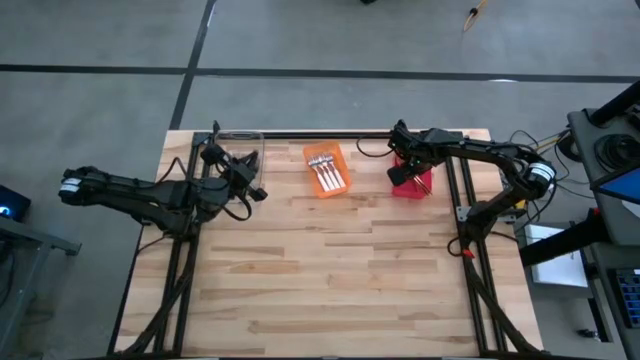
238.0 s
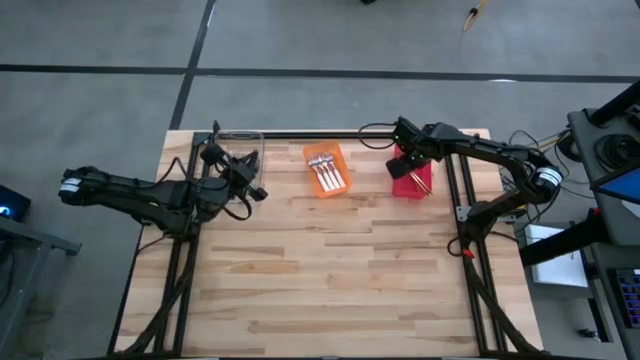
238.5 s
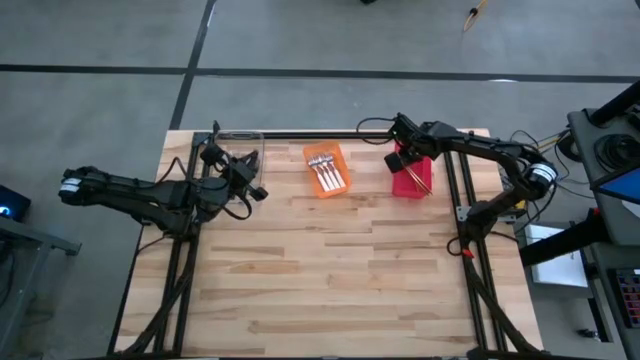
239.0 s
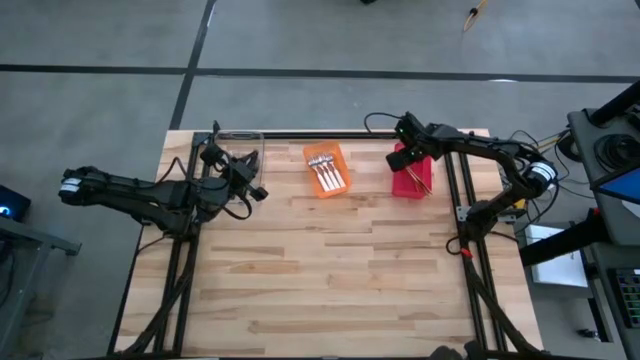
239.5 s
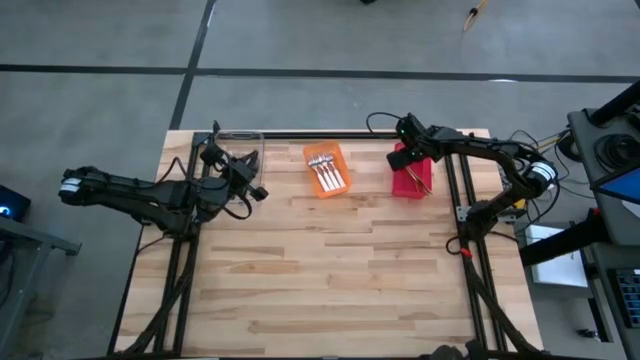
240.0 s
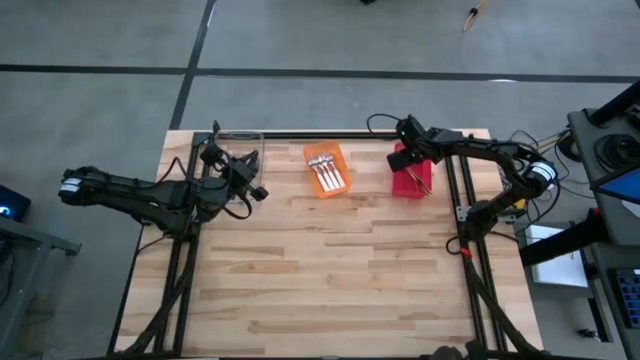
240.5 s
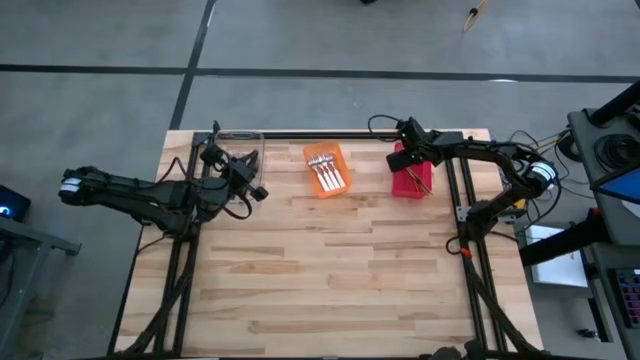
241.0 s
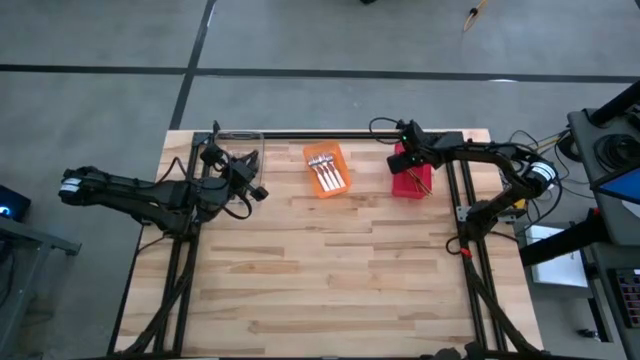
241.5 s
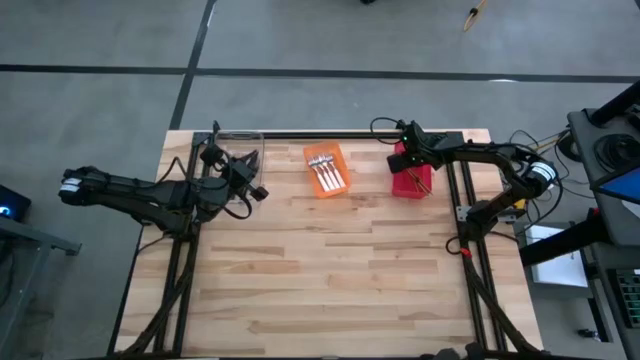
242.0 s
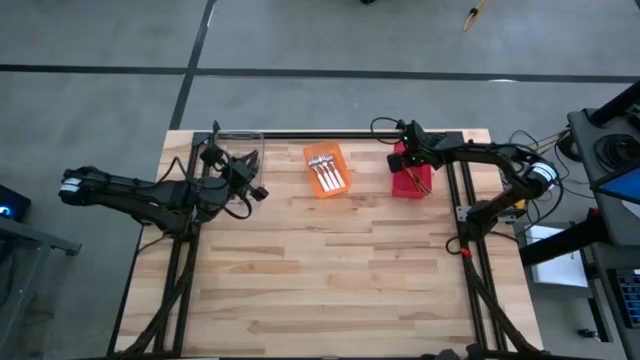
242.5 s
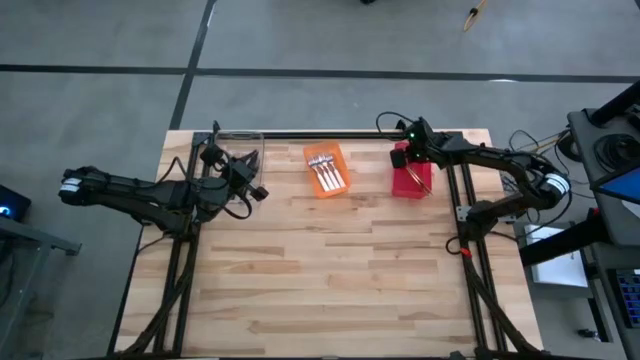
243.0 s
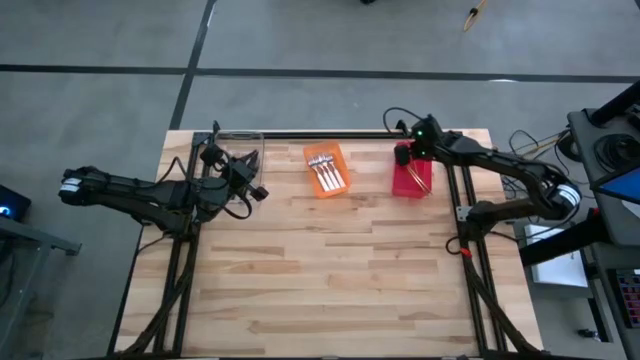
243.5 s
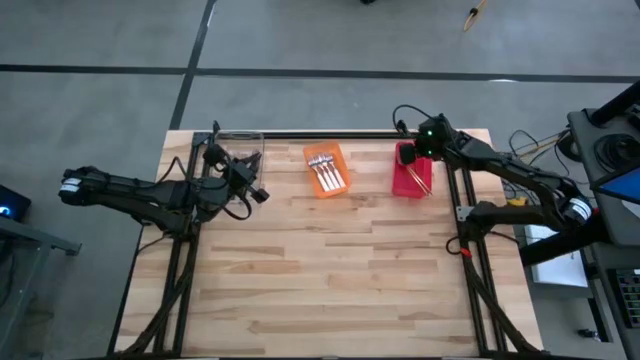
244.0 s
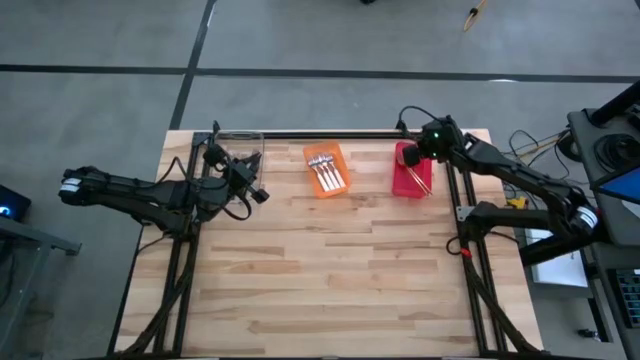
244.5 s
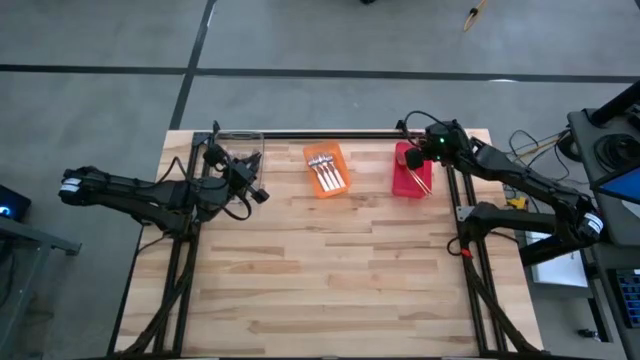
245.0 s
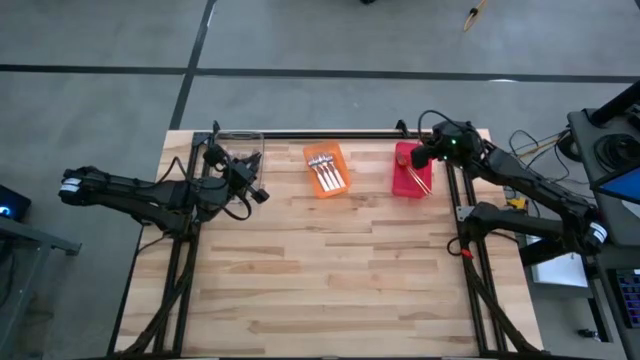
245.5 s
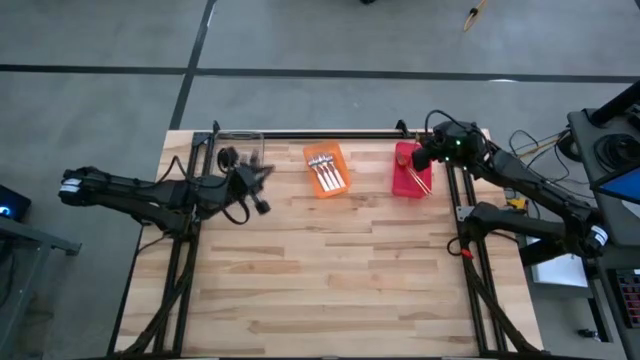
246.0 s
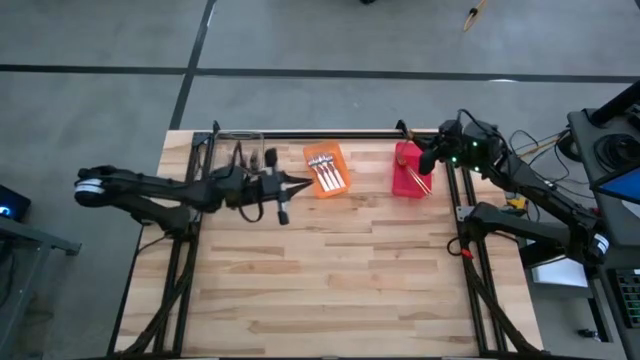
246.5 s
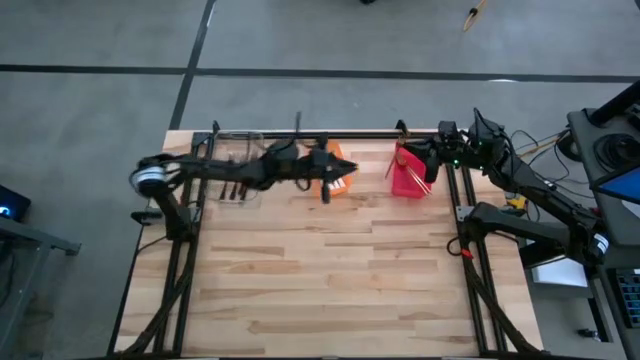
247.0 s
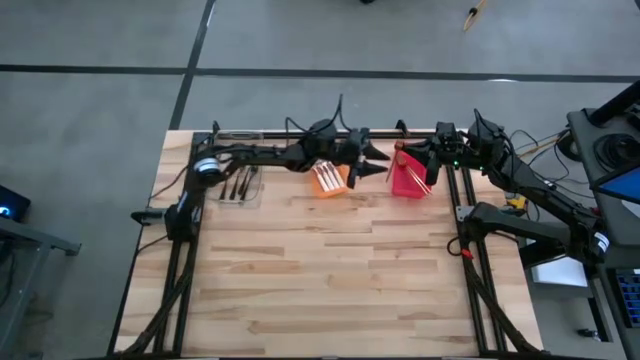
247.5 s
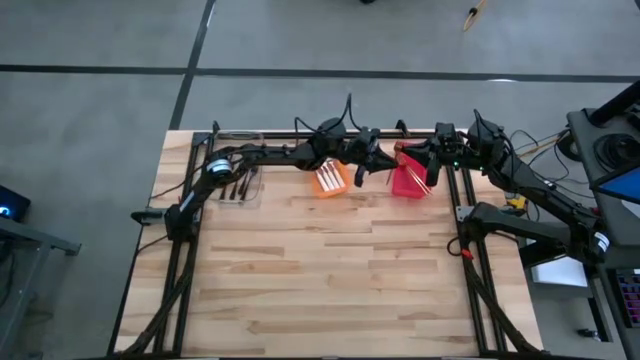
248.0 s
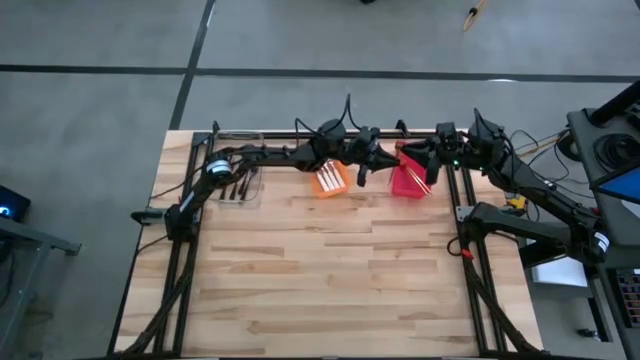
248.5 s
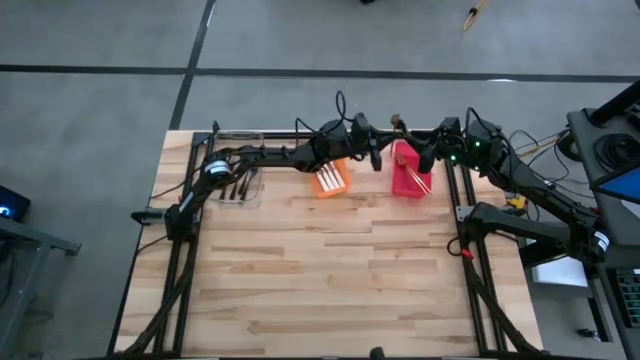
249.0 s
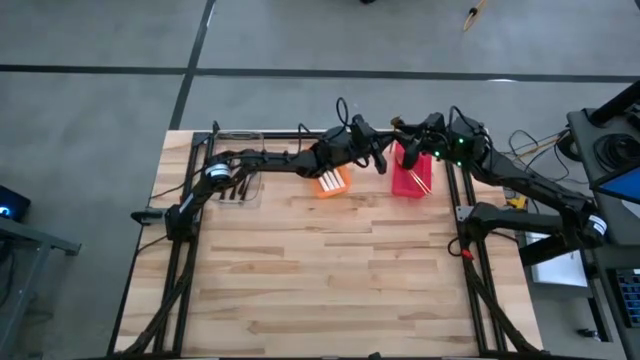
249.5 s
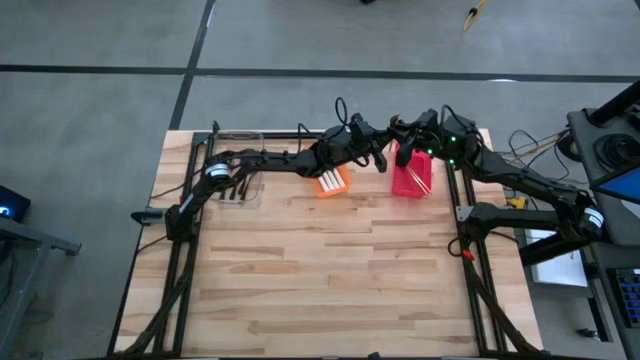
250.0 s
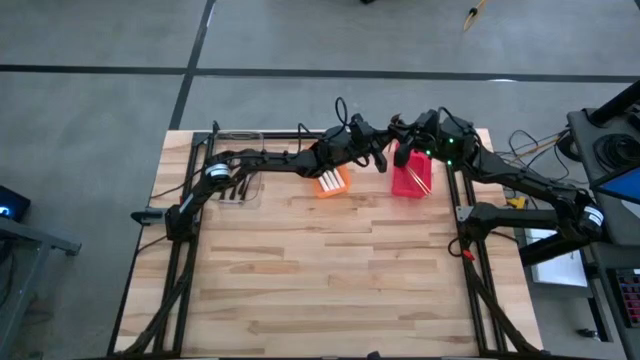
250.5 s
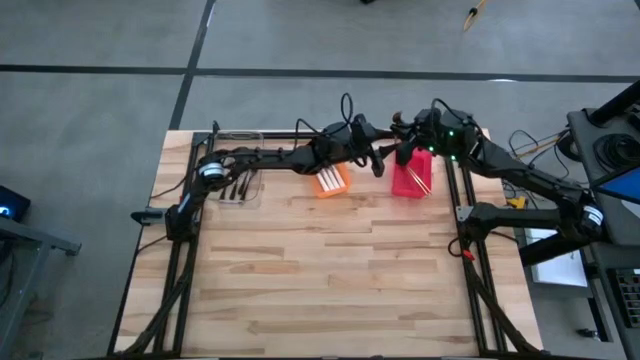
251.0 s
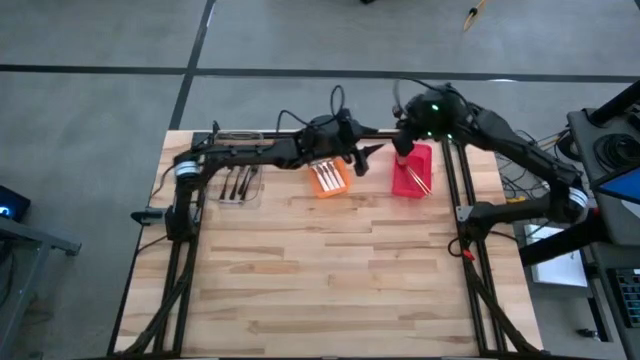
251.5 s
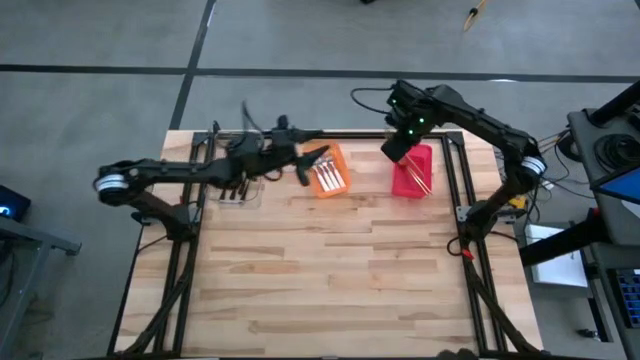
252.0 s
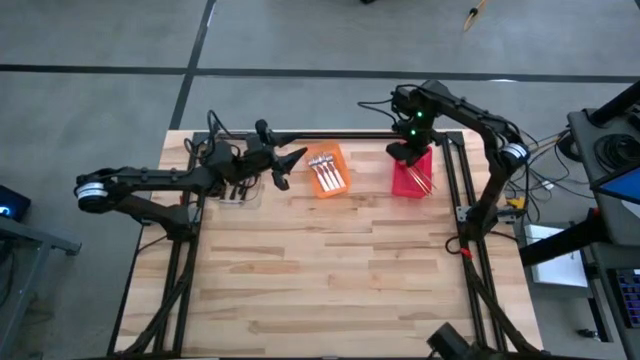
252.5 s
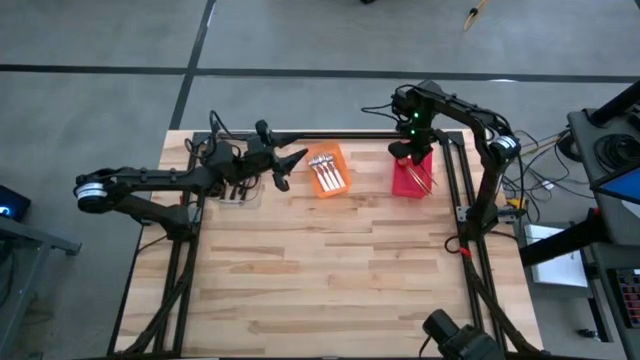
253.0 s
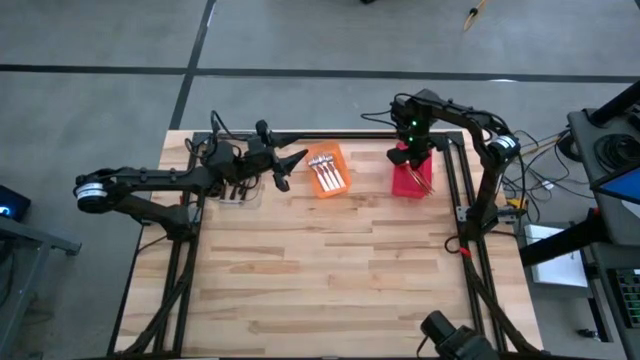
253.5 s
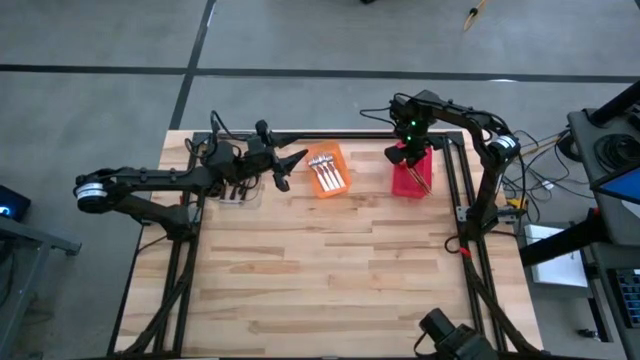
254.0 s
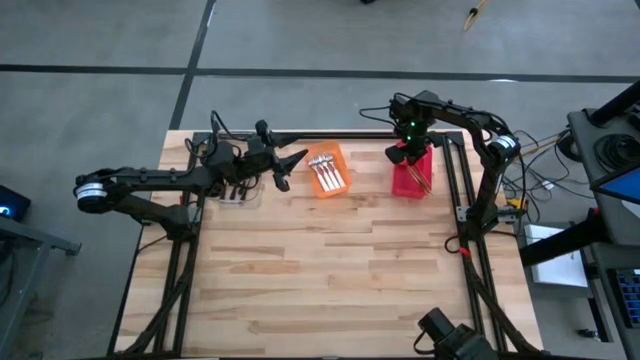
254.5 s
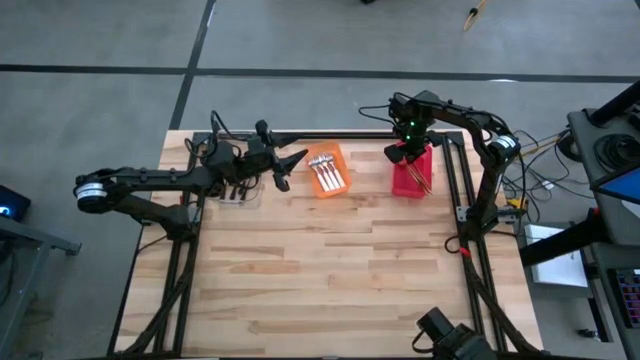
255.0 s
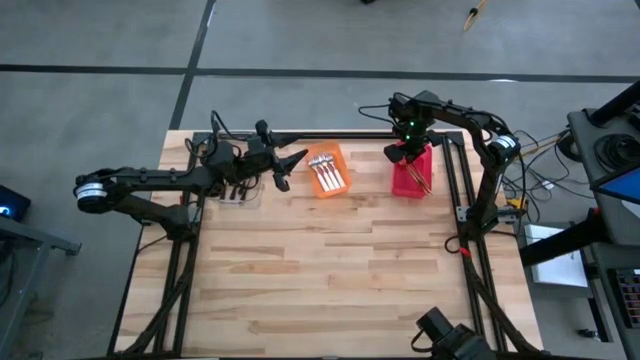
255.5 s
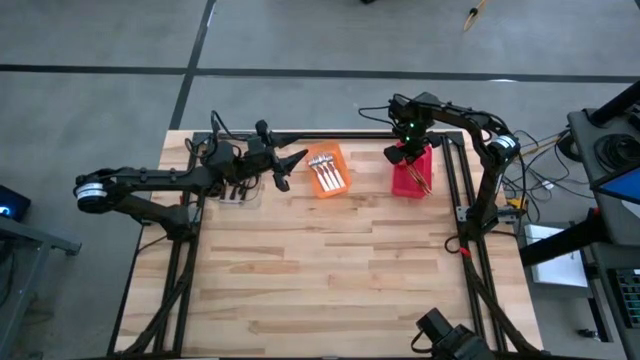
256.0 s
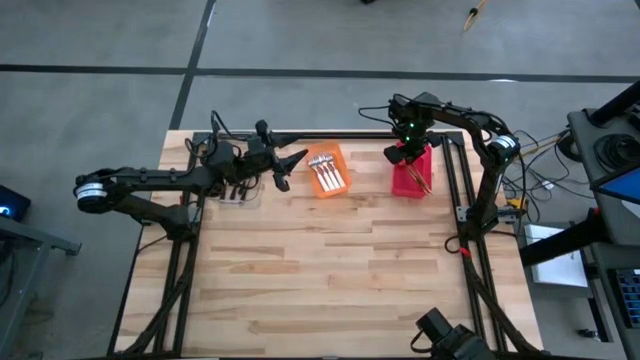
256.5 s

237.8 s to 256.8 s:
Task: Sort silverware by color (type)
Adjust the gold fork

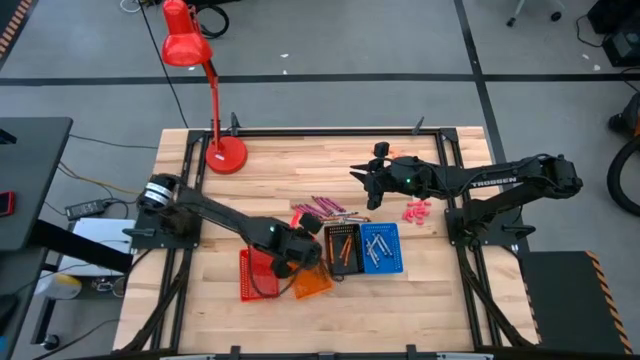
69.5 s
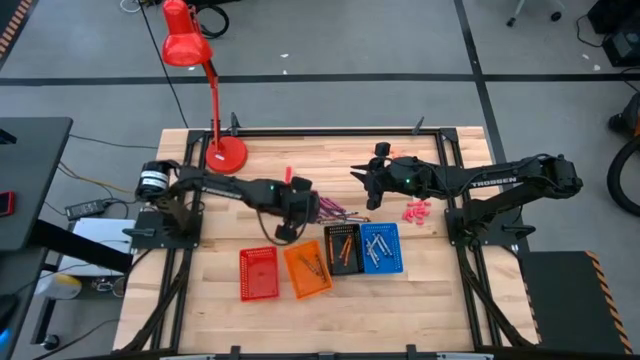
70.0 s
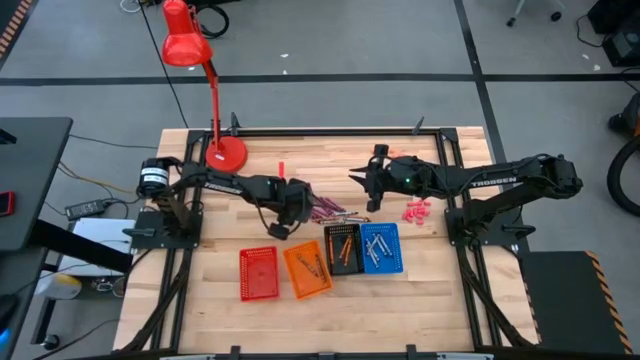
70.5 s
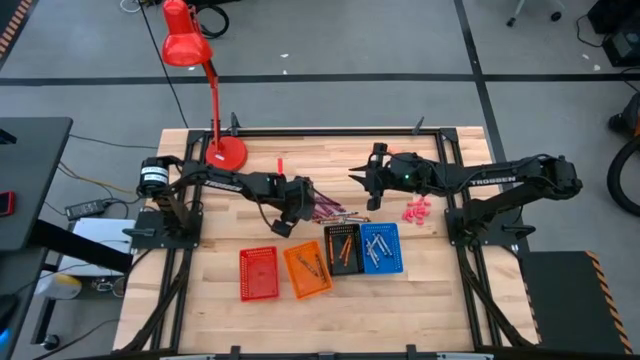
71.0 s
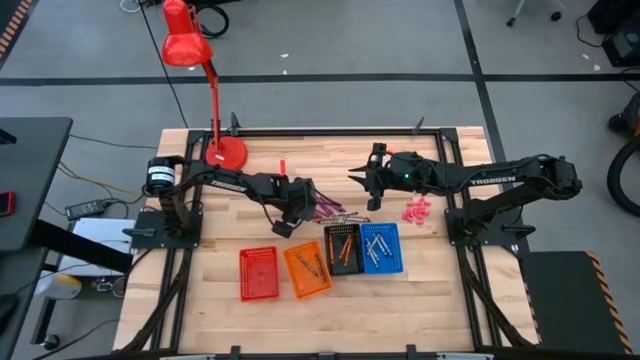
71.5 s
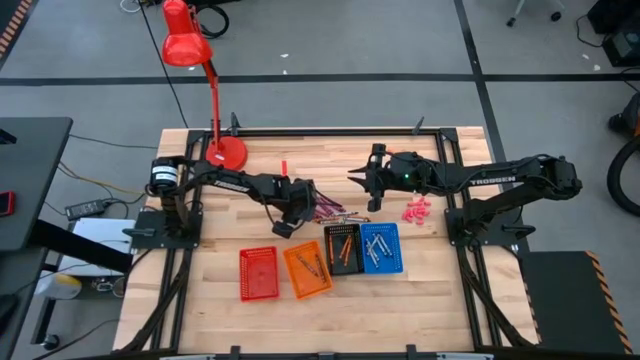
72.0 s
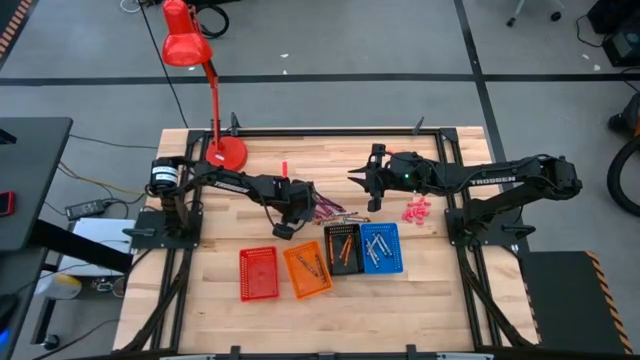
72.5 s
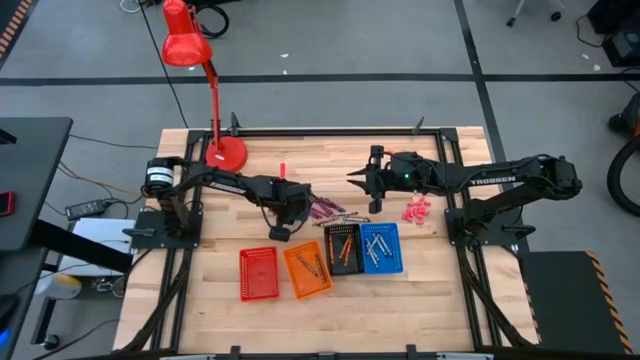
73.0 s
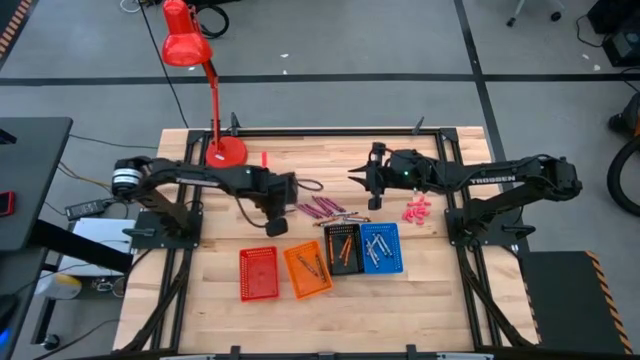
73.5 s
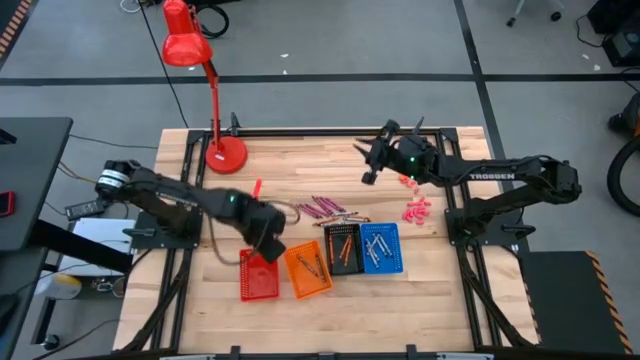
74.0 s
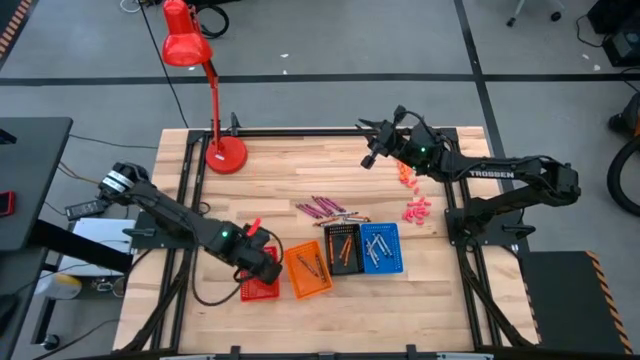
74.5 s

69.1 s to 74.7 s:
Task: Sort crayons
Put the pink crayon into the red bin
